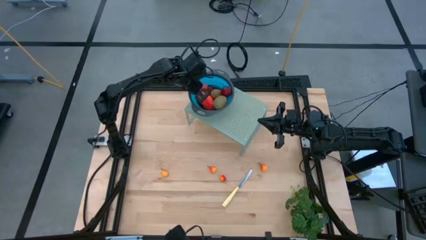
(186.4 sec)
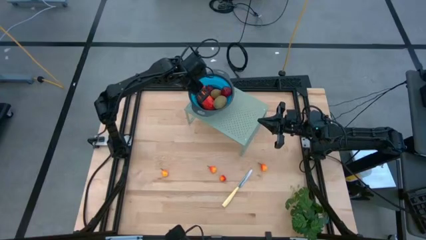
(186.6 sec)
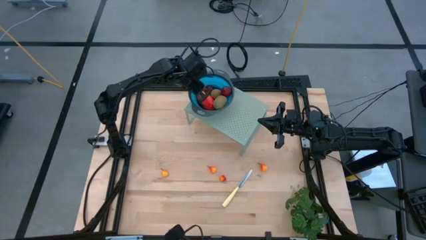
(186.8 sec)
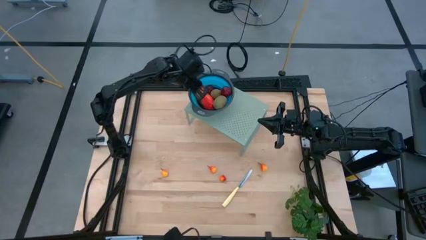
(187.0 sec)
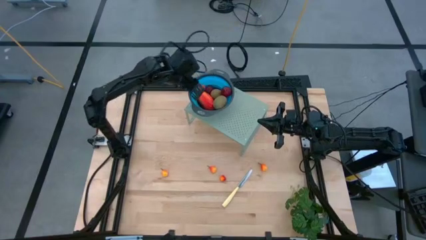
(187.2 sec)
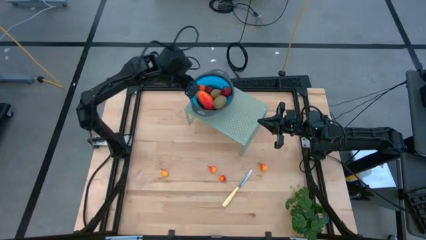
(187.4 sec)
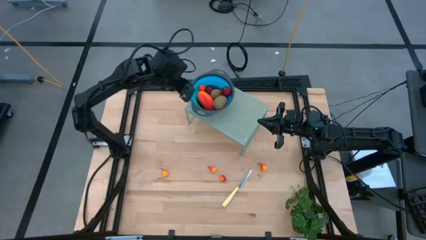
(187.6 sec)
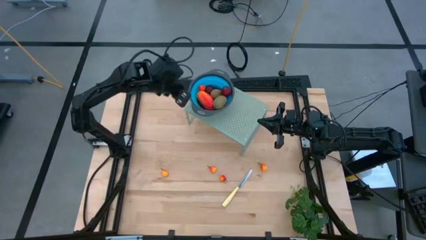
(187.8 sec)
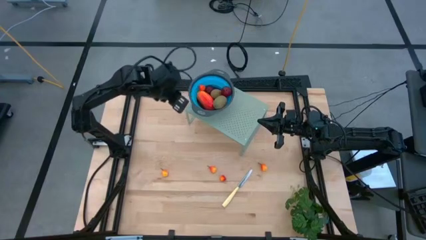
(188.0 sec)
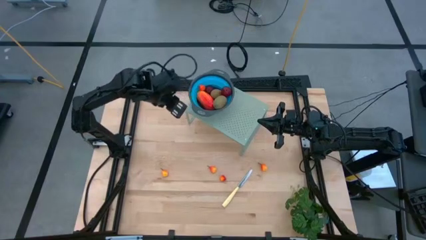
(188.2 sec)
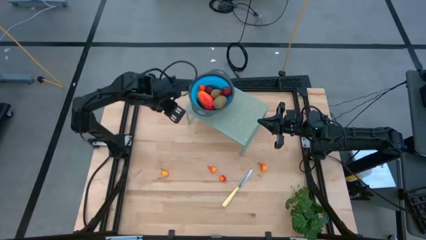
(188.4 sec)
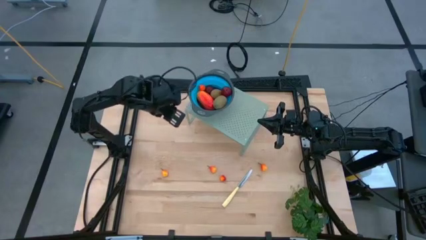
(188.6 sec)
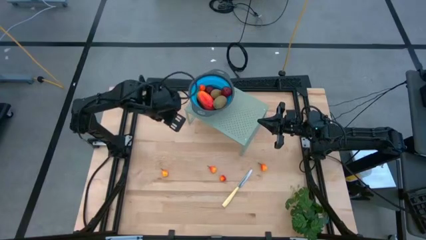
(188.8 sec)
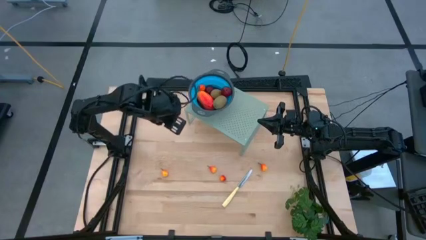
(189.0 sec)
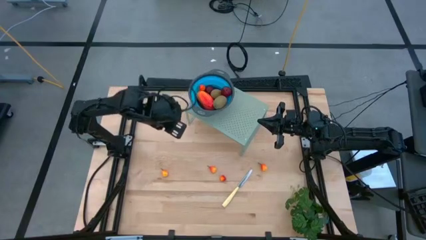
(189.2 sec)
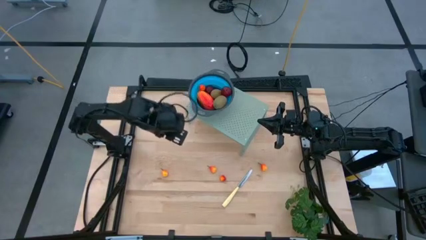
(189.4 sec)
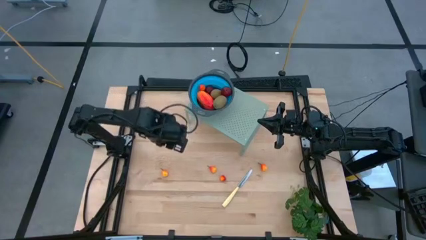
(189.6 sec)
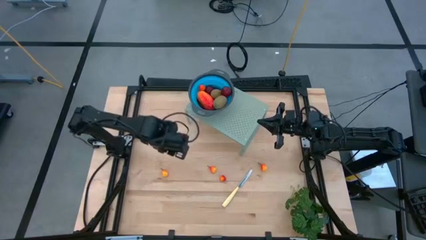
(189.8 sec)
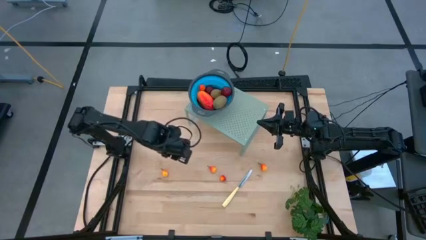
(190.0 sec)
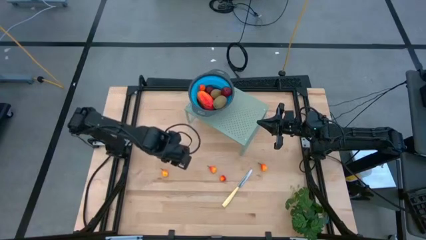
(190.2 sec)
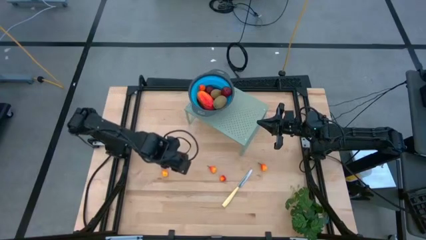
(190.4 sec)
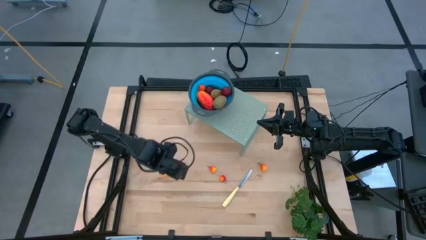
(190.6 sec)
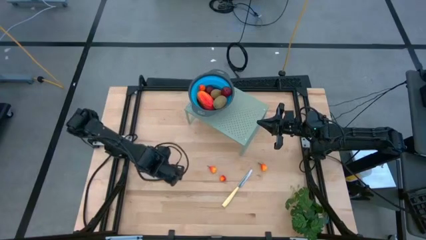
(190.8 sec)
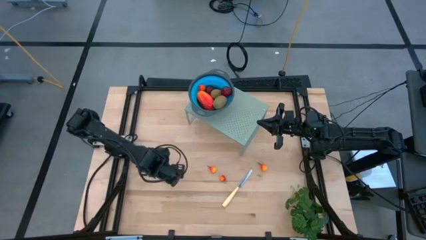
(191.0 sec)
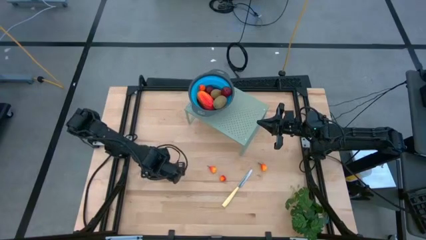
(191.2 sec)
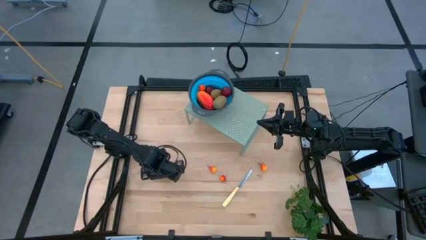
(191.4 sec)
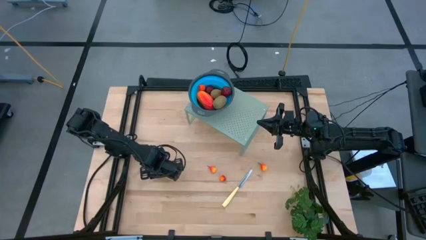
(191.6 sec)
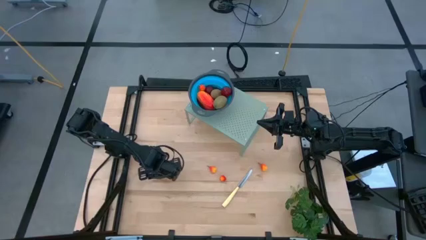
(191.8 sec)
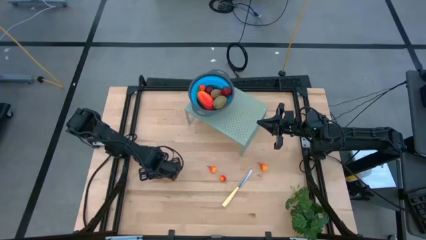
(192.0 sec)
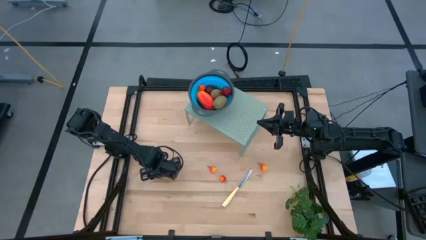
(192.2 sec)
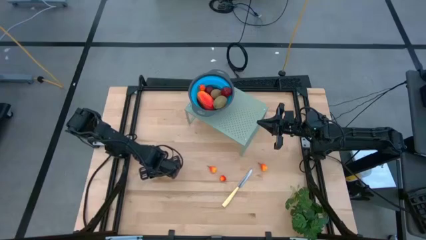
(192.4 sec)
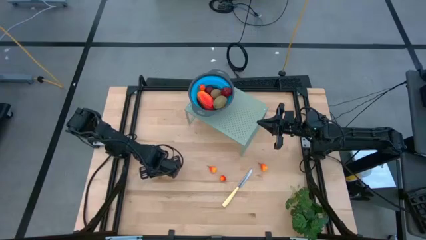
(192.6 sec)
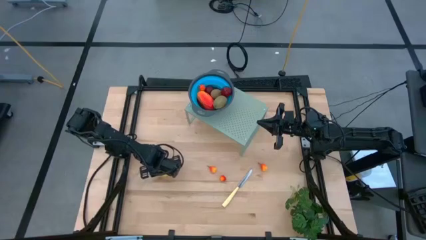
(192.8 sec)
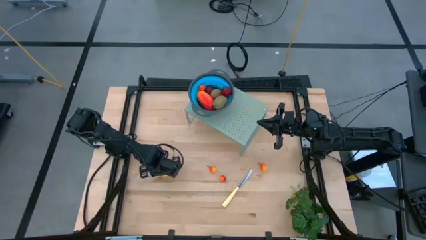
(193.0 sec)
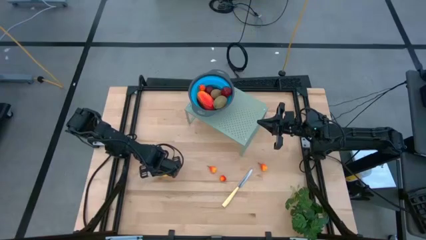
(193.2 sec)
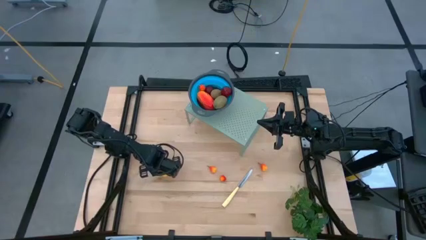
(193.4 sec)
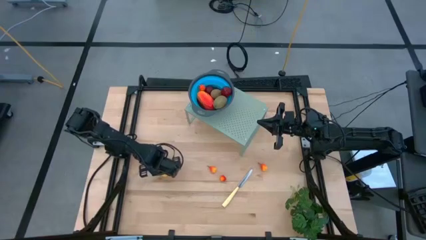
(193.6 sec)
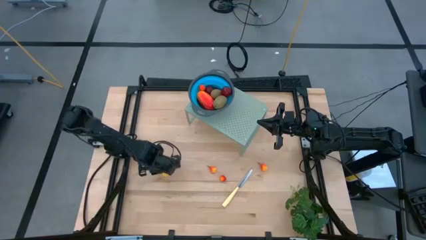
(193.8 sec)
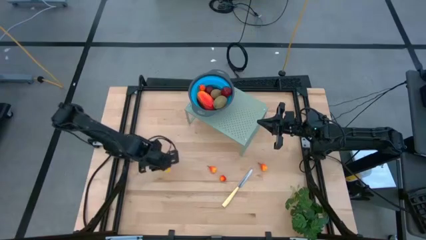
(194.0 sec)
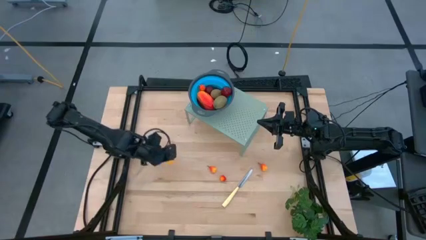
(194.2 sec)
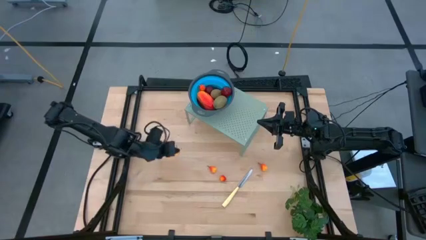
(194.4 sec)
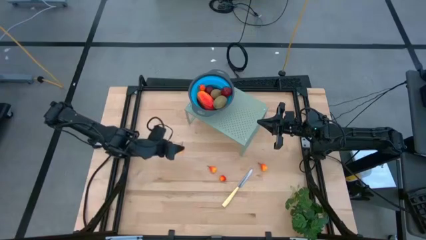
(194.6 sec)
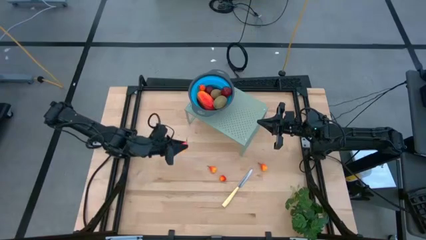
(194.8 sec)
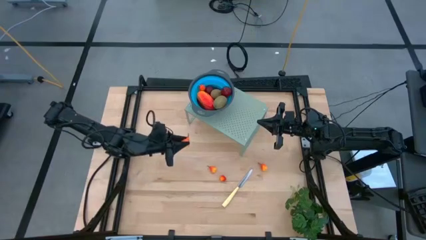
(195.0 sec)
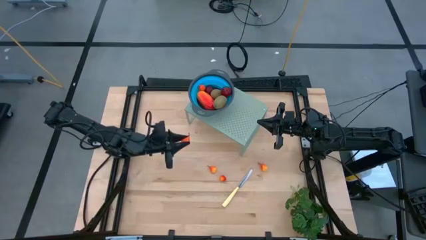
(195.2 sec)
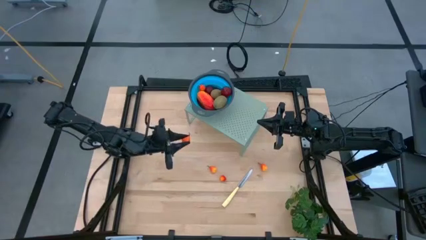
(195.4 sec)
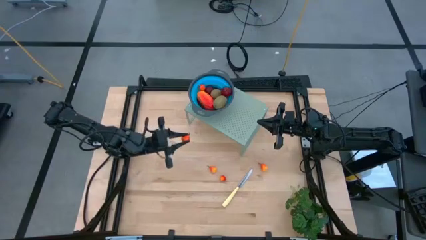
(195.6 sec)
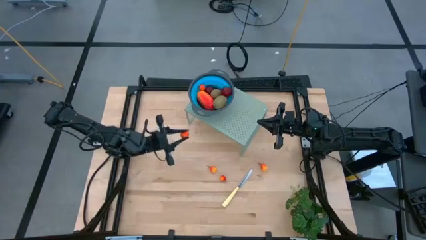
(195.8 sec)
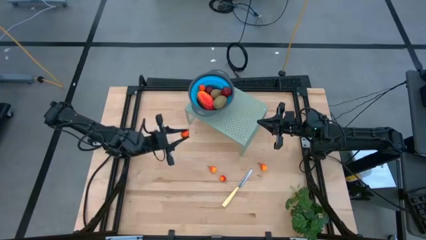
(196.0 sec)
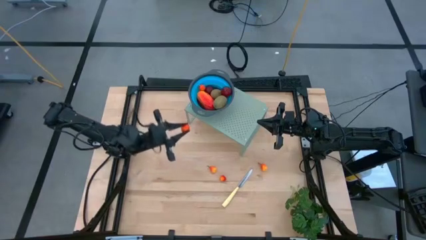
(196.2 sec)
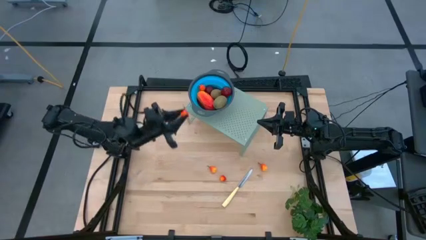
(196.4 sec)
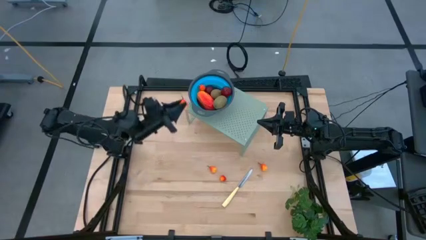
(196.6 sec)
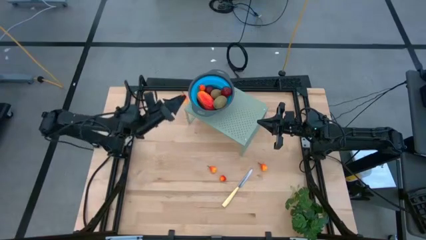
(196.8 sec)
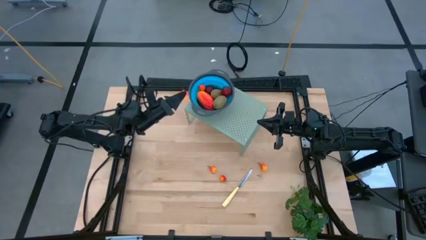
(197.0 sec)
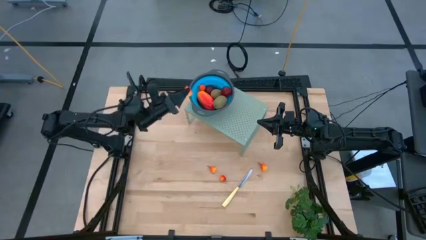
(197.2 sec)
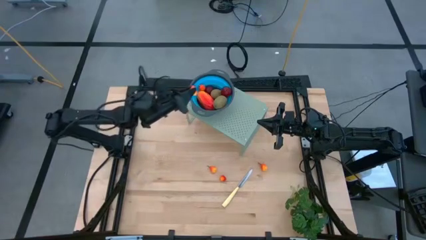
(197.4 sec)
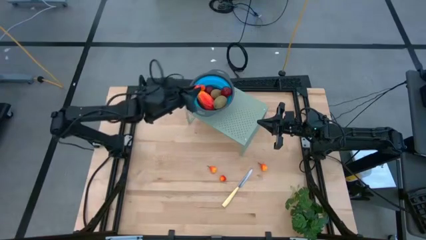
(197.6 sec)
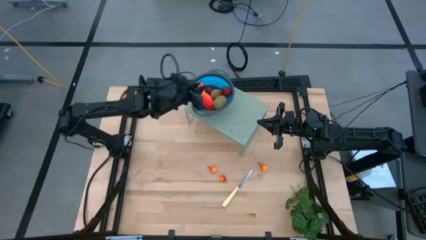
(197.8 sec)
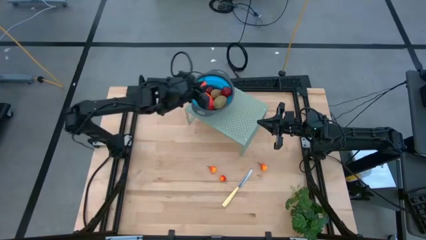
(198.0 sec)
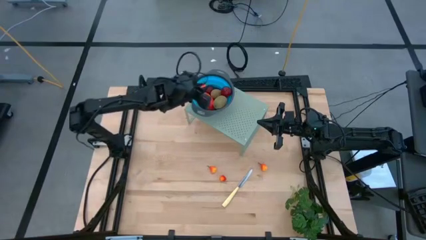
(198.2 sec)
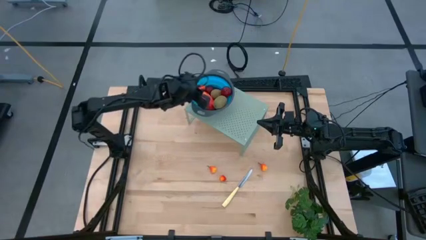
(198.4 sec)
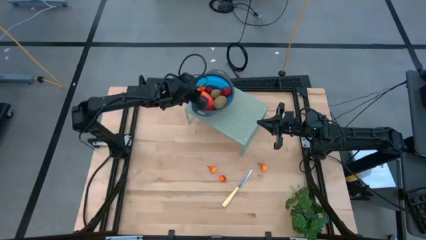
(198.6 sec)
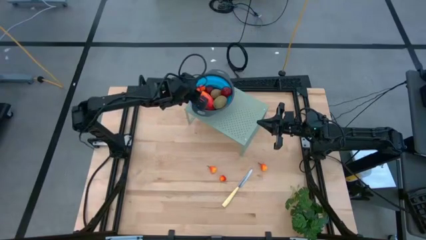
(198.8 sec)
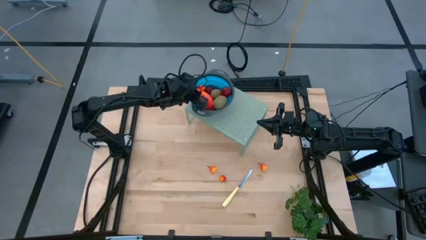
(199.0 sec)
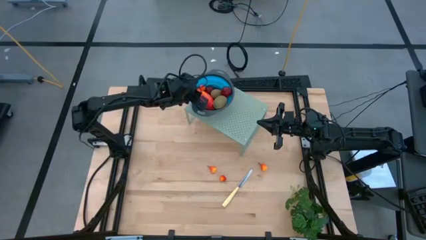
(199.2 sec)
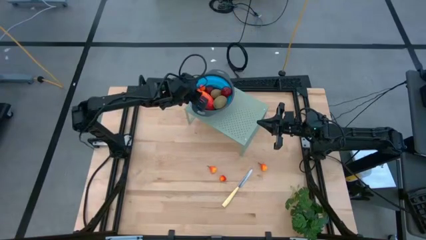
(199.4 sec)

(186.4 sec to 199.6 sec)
Task: Pick & Place Fruit
Put the peach into the blue strainer bowl on the shelf
